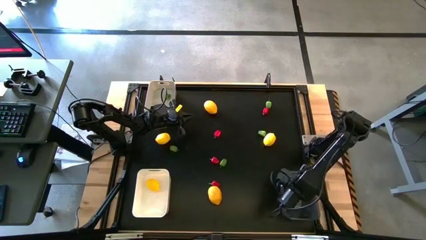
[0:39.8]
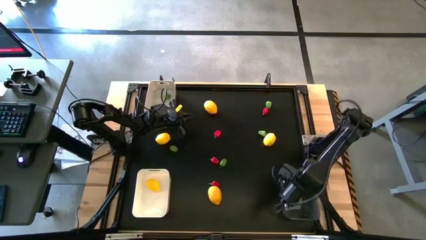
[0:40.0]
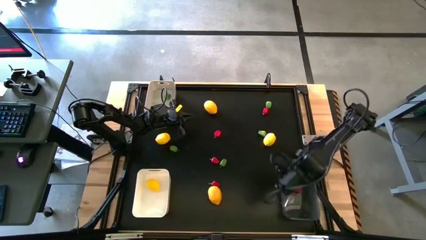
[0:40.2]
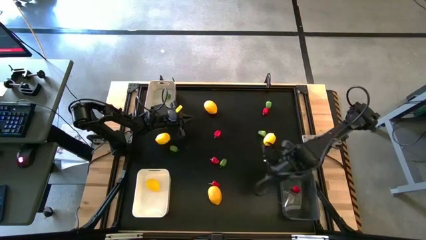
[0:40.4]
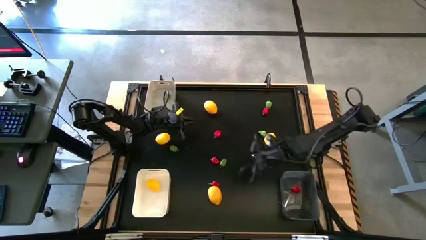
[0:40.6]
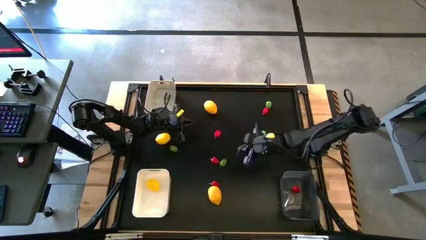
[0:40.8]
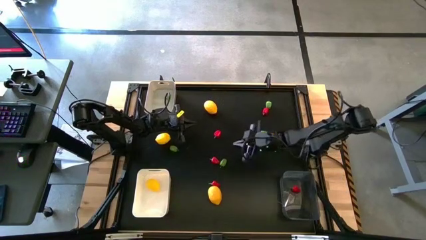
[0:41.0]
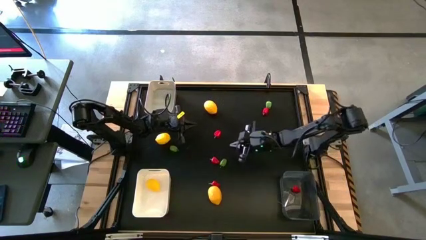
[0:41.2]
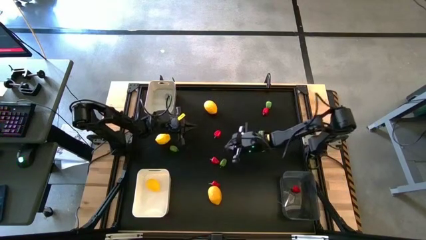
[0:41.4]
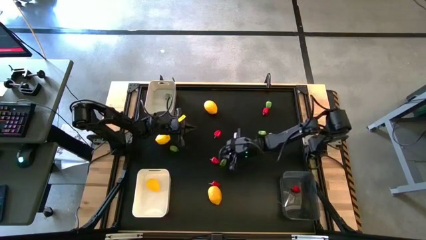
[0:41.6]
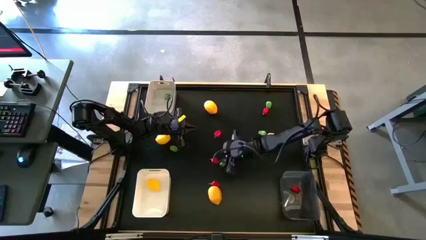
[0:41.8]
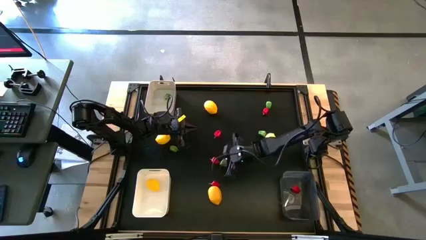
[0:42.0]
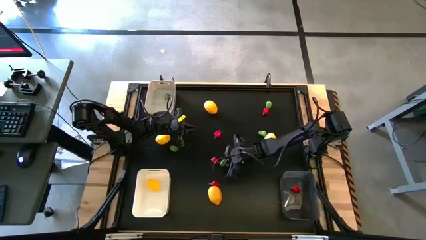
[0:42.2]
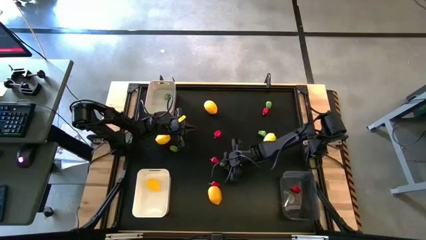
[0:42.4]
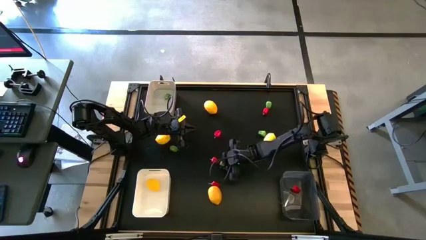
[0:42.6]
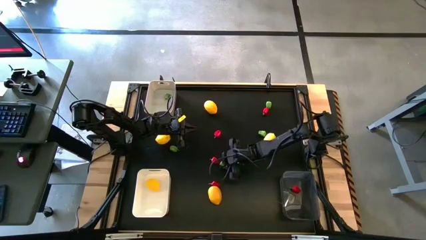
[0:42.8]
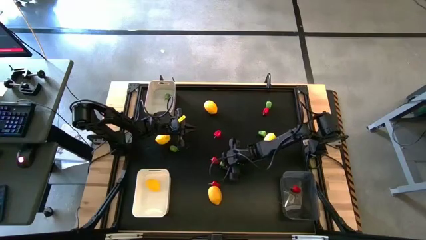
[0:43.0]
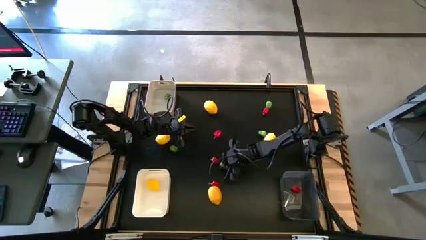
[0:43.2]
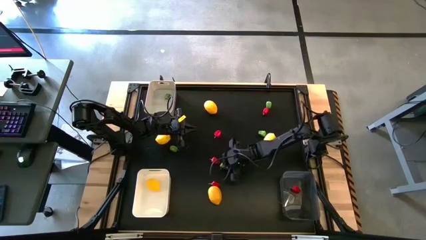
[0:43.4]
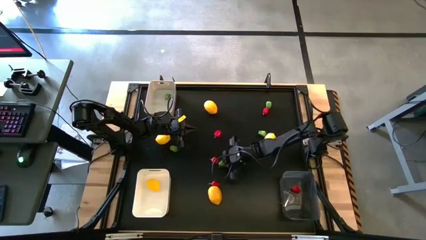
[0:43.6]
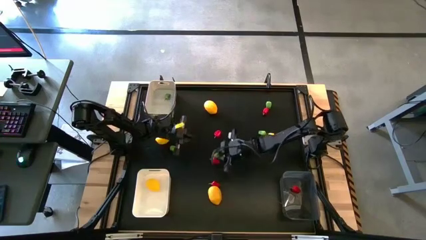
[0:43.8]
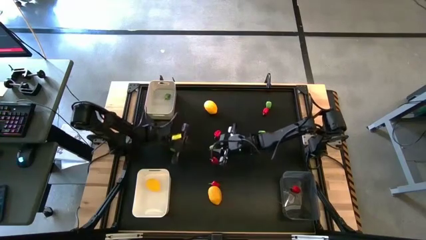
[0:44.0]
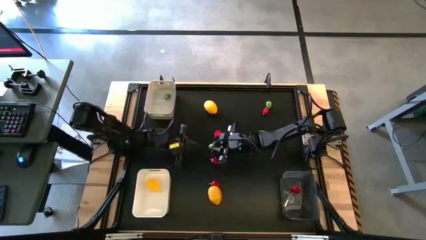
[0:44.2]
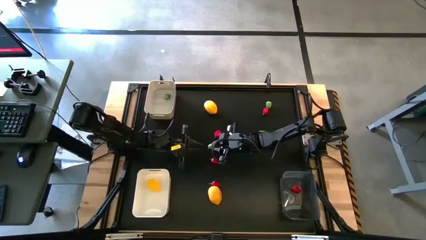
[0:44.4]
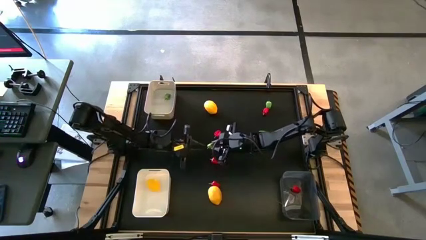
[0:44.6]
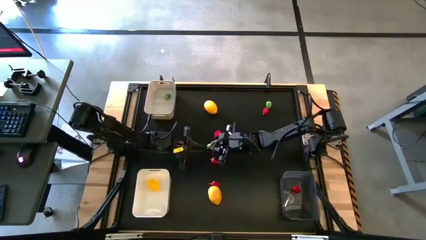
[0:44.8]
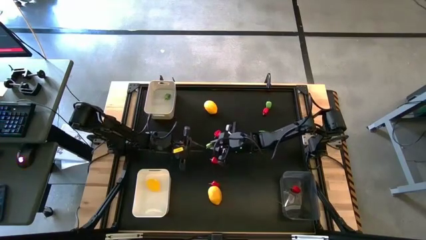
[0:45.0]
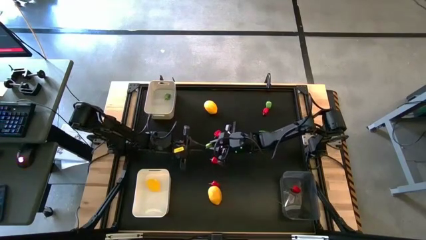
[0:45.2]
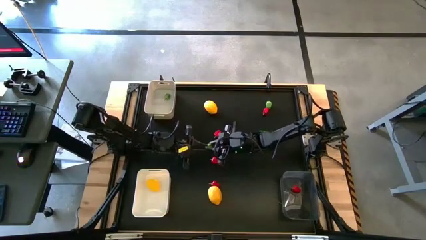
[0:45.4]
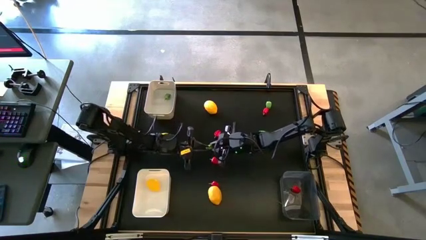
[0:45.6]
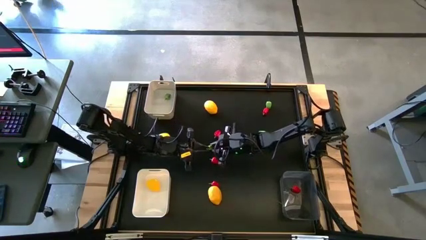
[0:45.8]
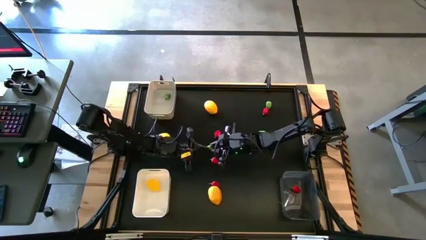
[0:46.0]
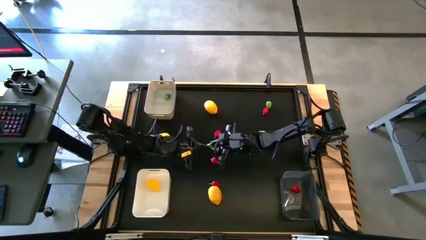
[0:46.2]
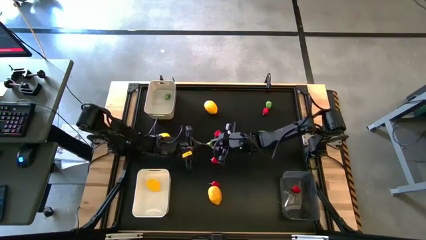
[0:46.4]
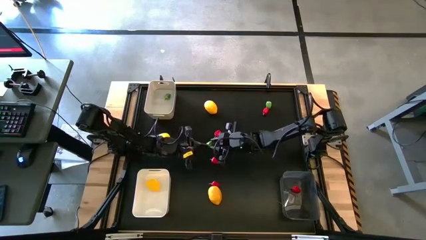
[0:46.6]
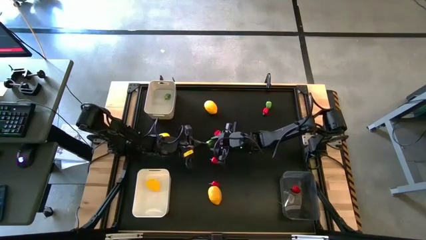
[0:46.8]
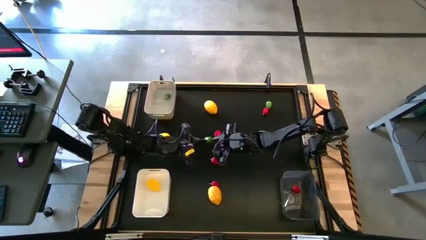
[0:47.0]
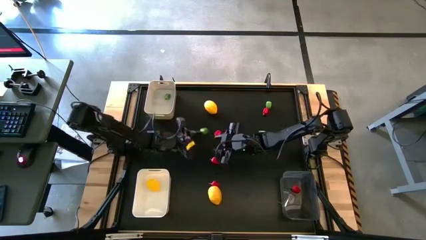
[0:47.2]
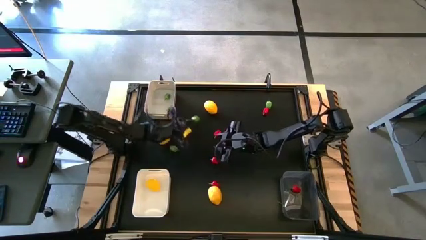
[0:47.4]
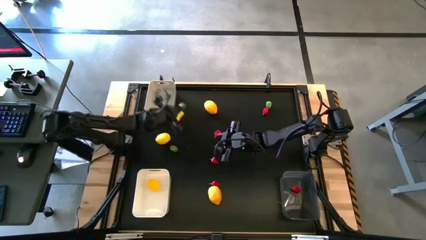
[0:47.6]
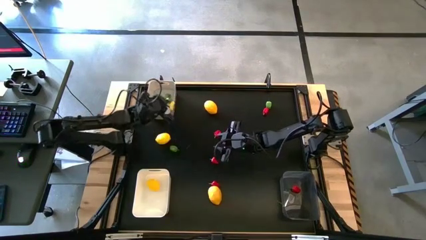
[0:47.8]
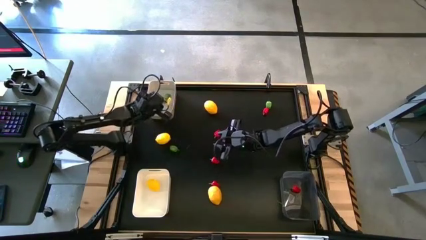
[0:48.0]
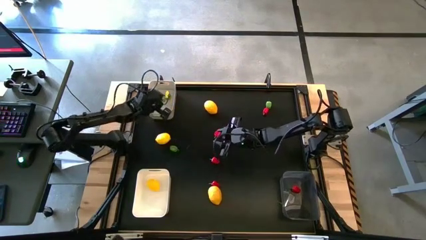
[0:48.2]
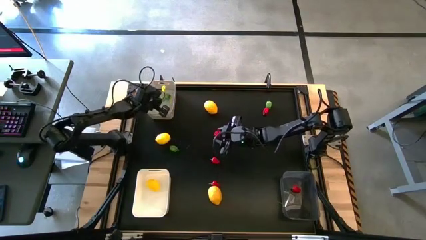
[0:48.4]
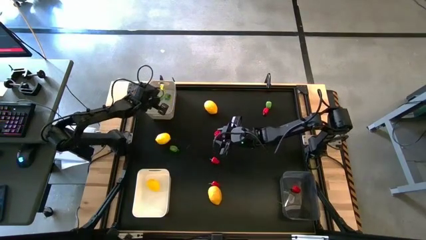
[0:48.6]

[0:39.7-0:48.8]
Task: Sort produce into baskets
Put the green chili pepper into the gray bin

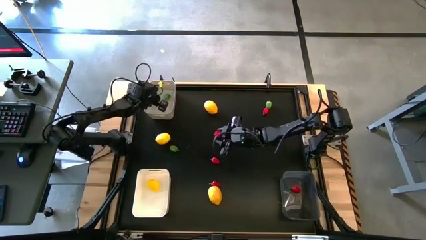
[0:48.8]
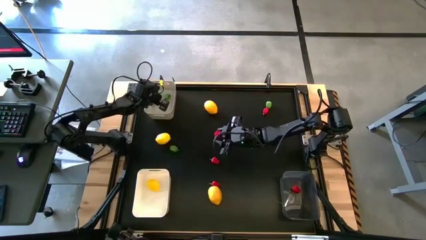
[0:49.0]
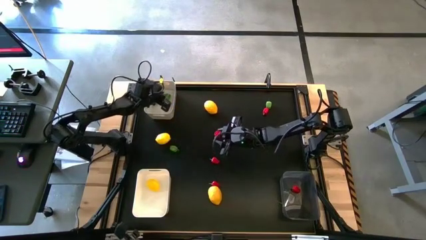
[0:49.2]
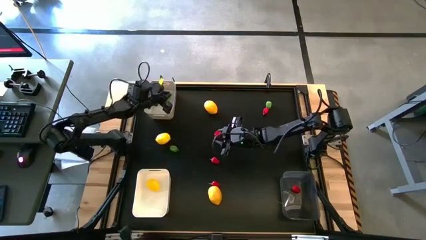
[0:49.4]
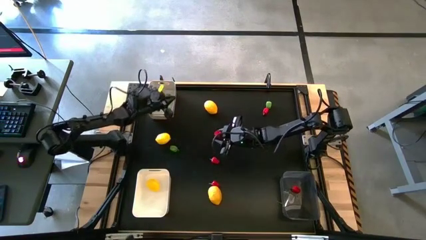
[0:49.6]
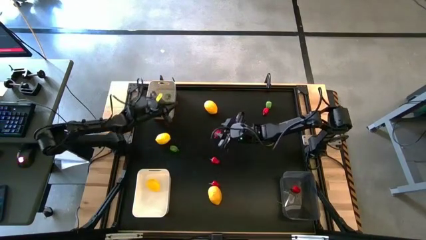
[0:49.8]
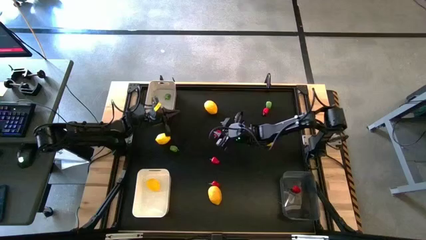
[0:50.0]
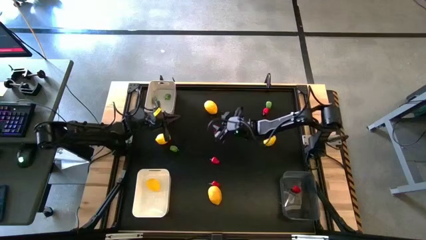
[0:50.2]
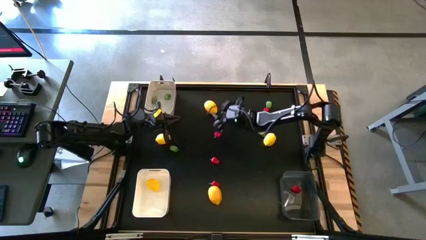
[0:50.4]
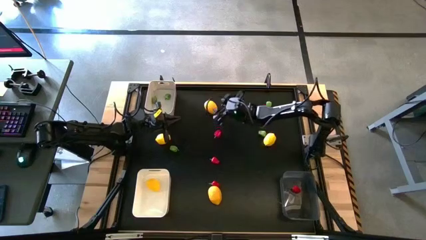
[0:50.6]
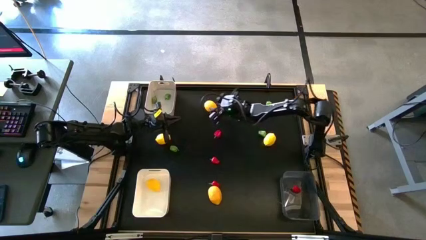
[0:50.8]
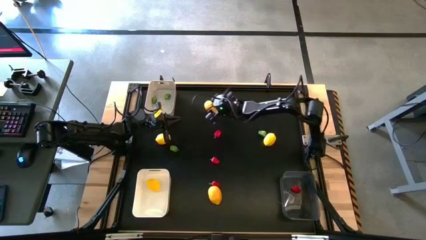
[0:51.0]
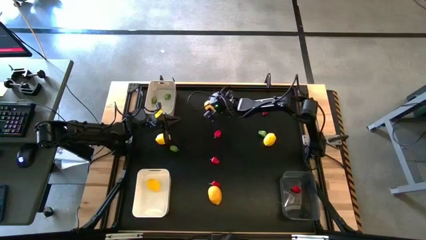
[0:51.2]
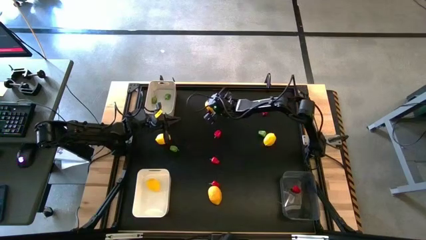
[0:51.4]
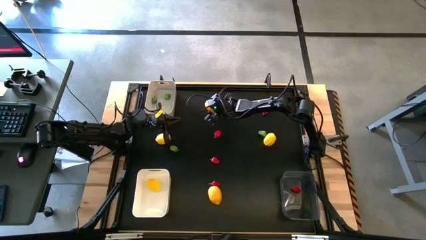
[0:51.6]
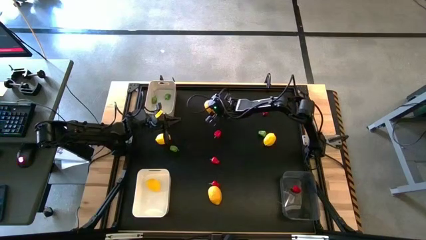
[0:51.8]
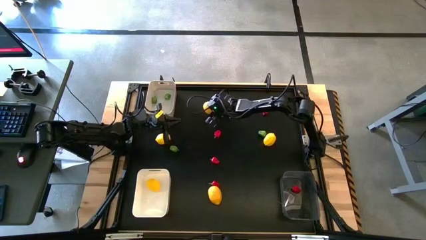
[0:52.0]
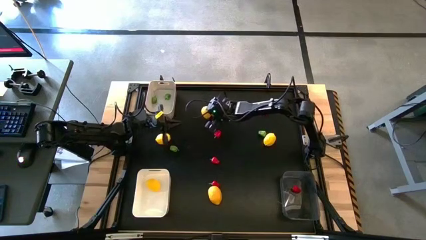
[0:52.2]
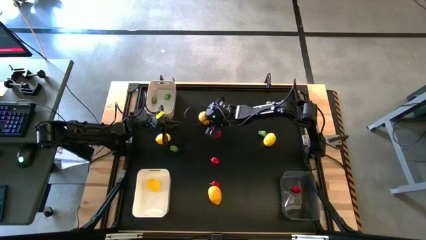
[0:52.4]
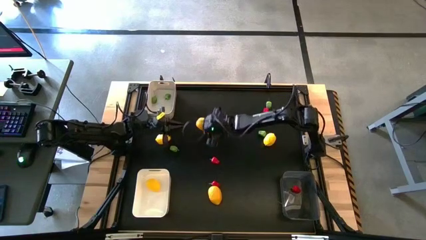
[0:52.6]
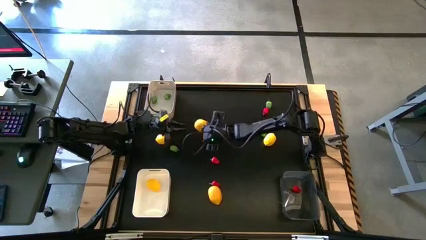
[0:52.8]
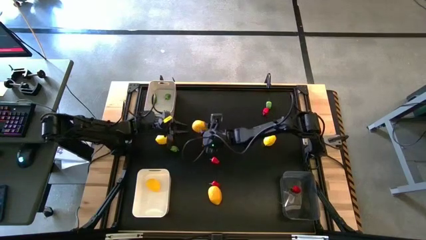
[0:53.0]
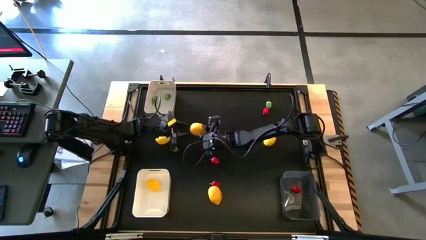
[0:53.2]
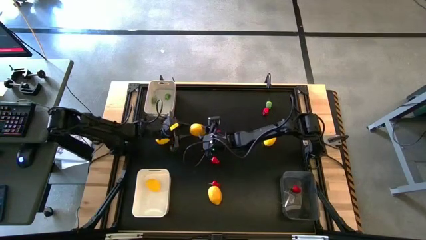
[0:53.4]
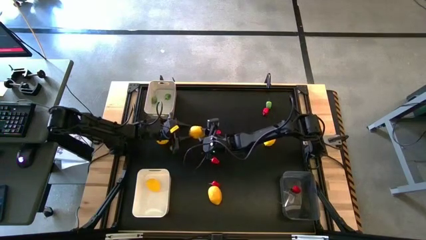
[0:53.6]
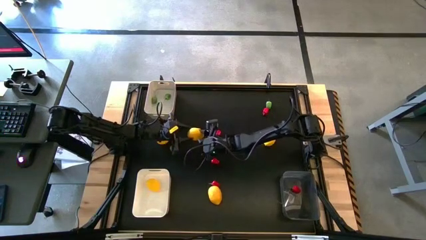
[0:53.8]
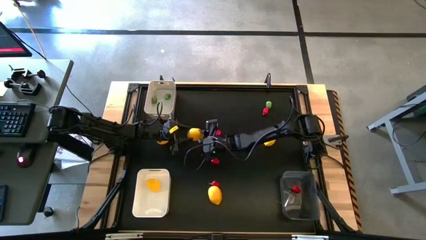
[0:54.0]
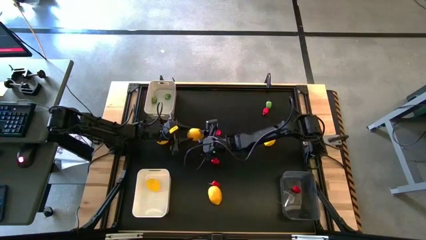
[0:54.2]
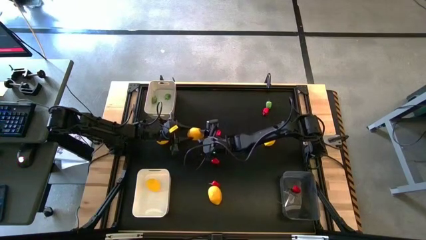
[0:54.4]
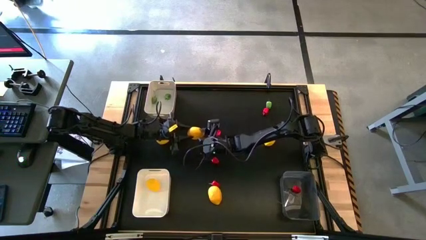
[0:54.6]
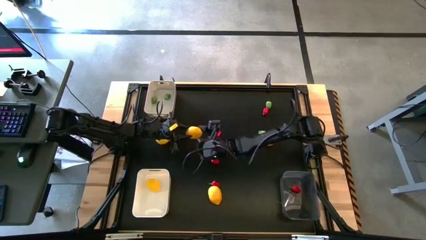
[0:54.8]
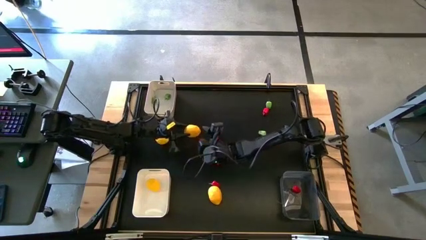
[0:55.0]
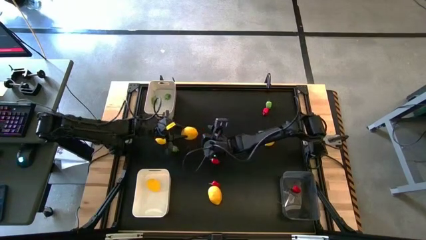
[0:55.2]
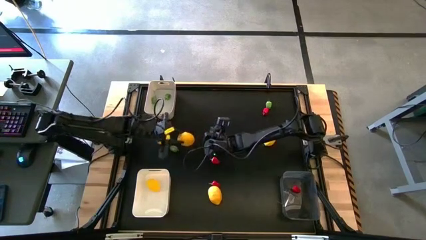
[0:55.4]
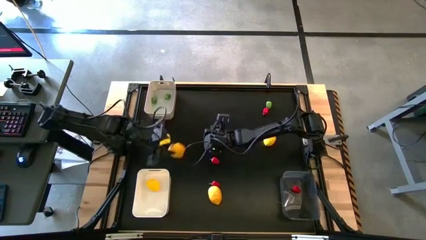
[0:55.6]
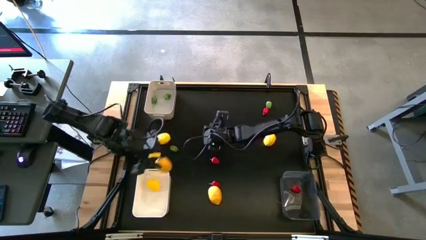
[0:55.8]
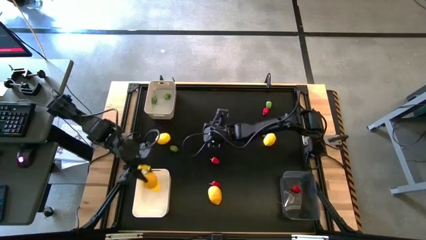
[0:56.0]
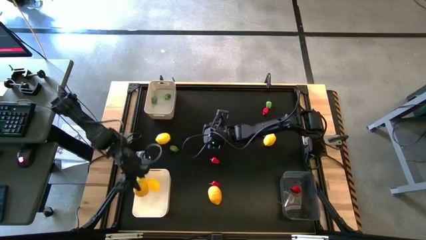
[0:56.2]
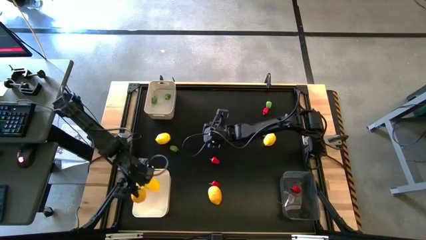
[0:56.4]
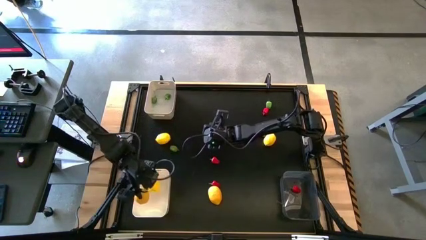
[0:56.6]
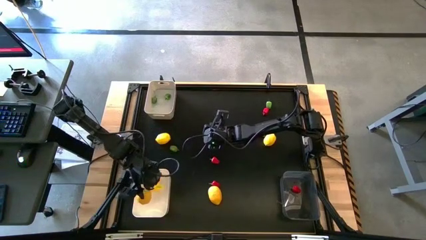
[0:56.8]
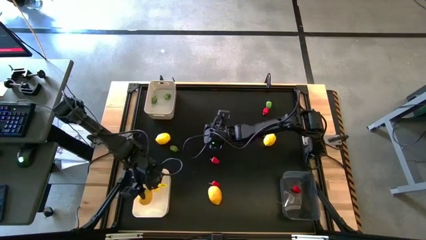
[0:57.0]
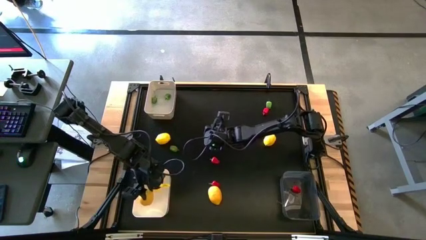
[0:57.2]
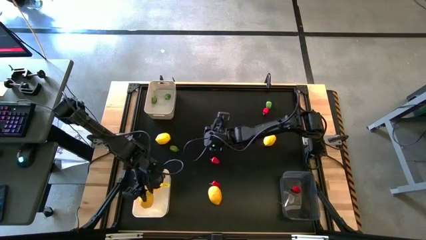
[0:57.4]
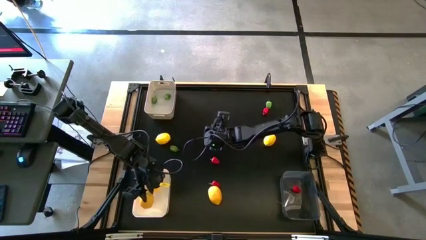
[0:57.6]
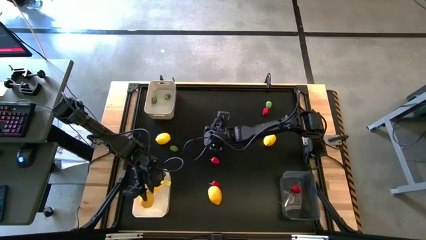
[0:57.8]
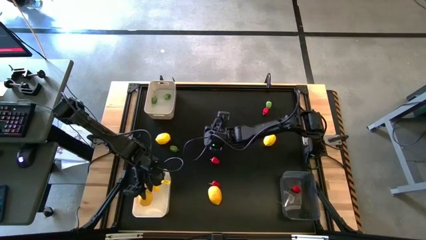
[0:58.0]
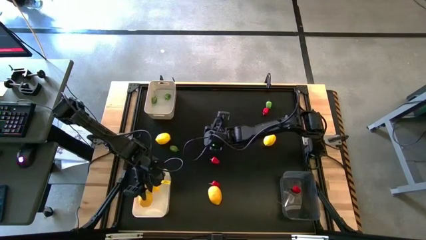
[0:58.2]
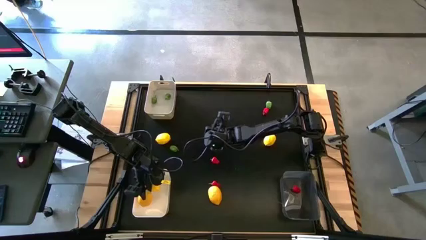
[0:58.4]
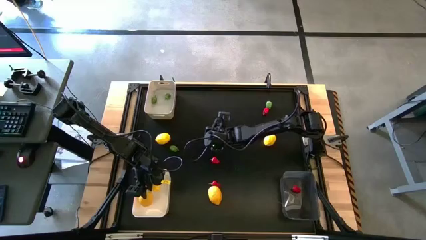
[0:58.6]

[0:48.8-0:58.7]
Put the yellow lemon into the white bin
